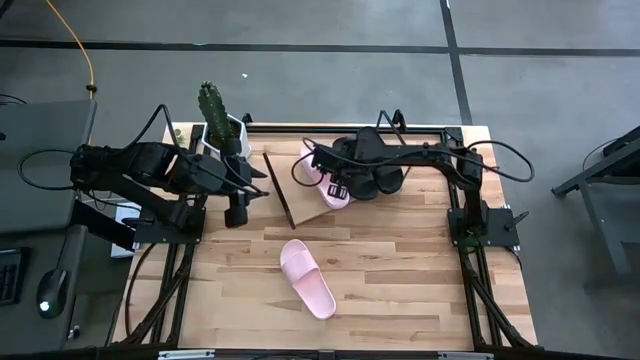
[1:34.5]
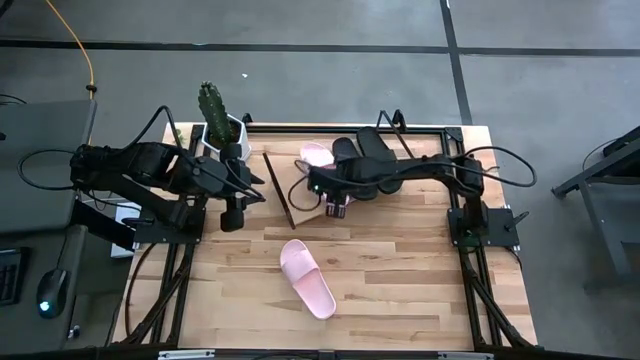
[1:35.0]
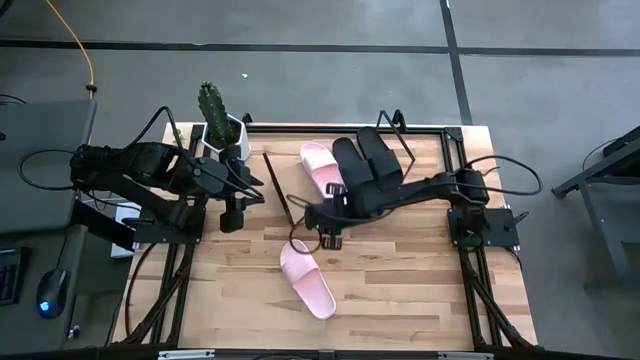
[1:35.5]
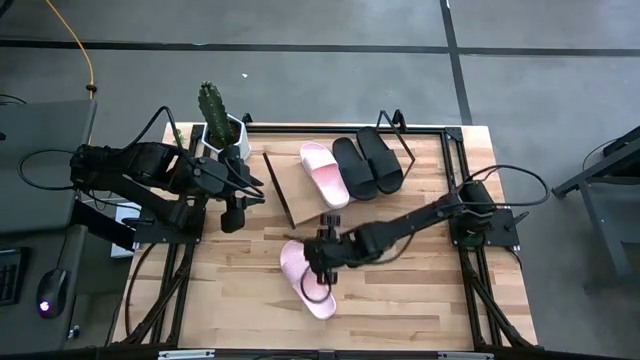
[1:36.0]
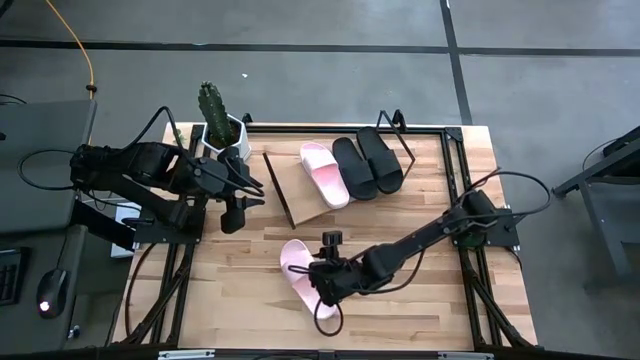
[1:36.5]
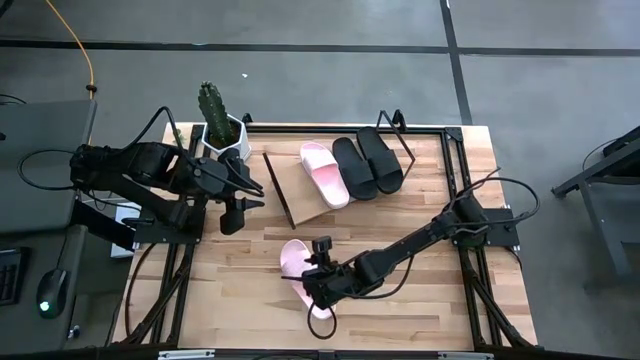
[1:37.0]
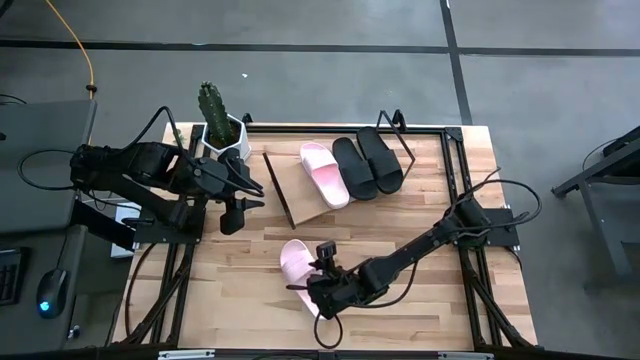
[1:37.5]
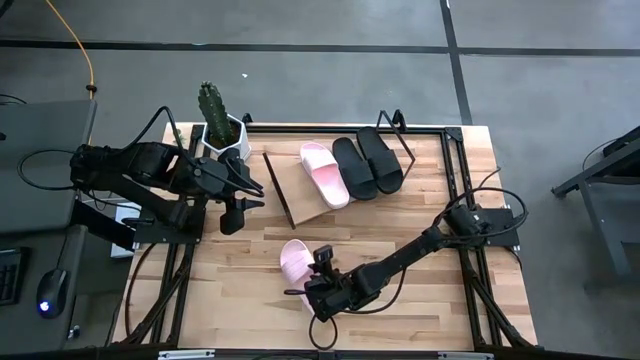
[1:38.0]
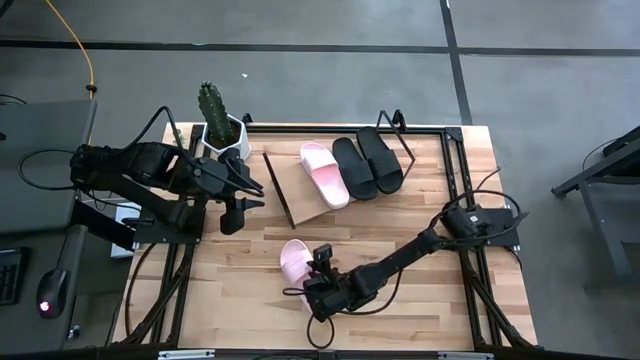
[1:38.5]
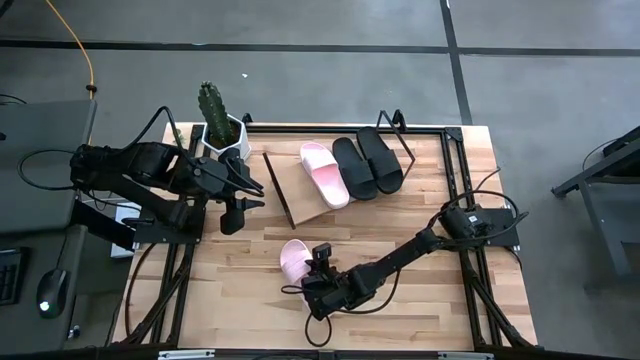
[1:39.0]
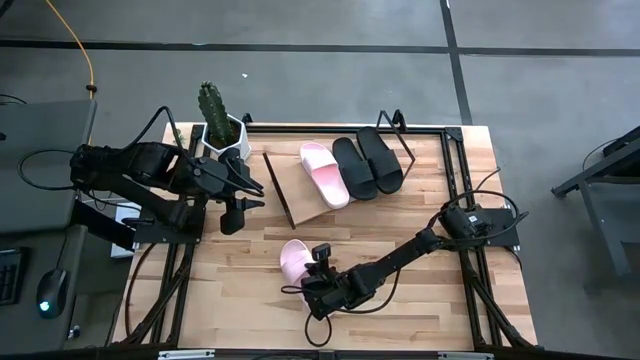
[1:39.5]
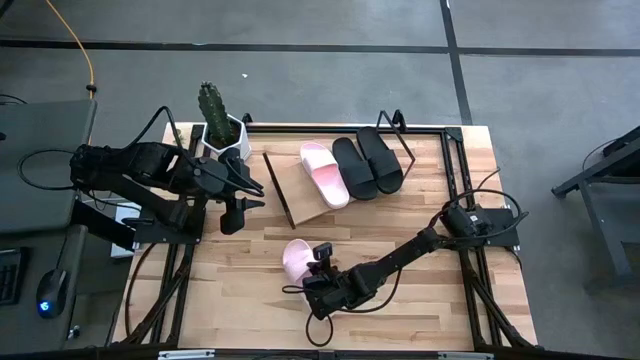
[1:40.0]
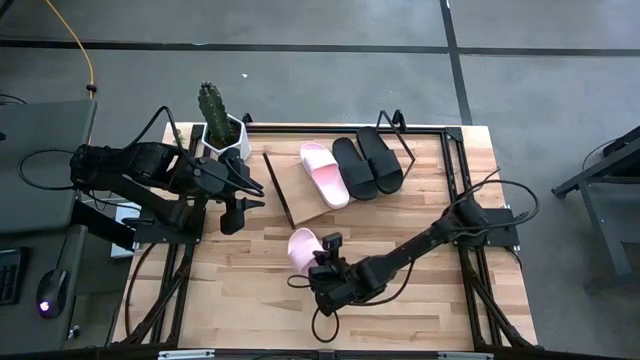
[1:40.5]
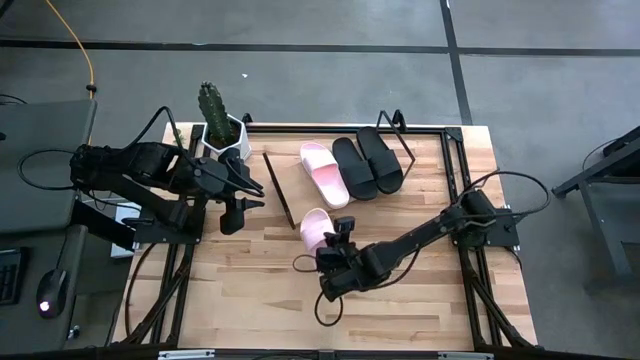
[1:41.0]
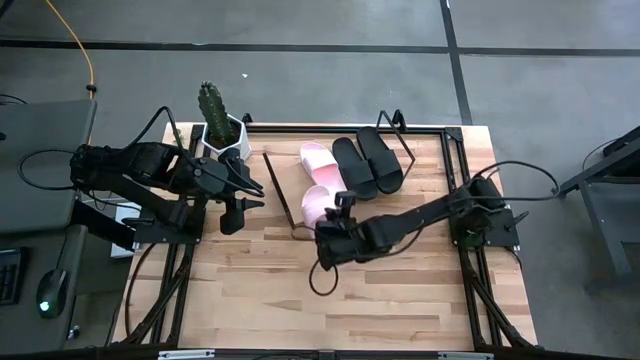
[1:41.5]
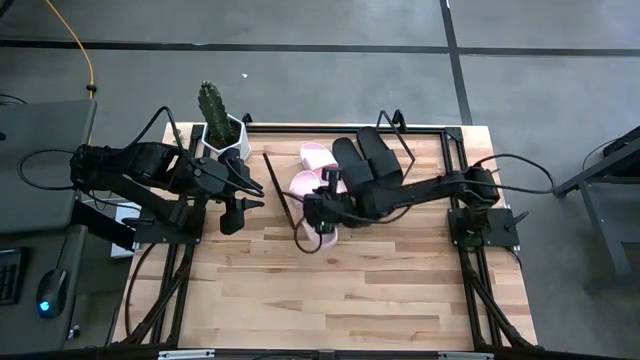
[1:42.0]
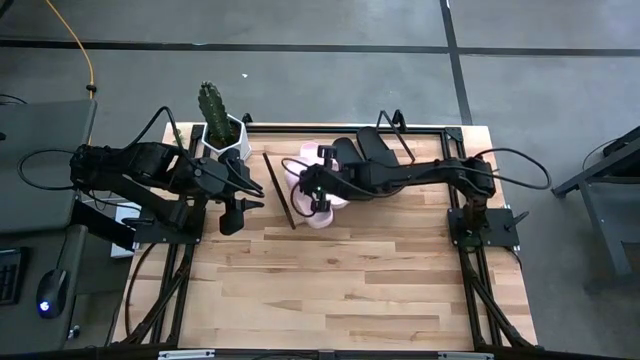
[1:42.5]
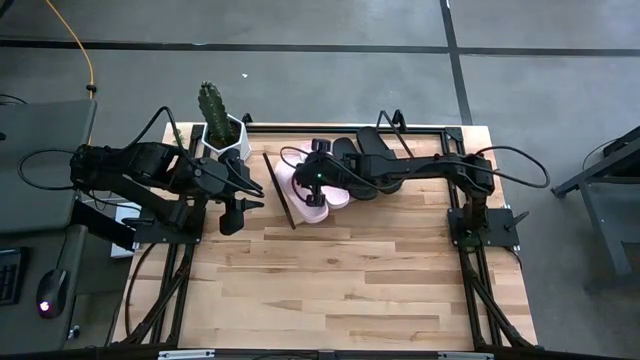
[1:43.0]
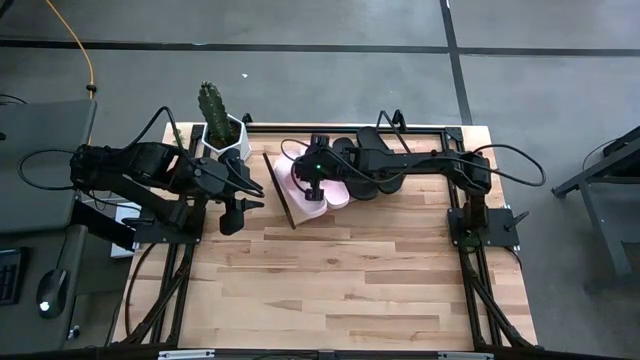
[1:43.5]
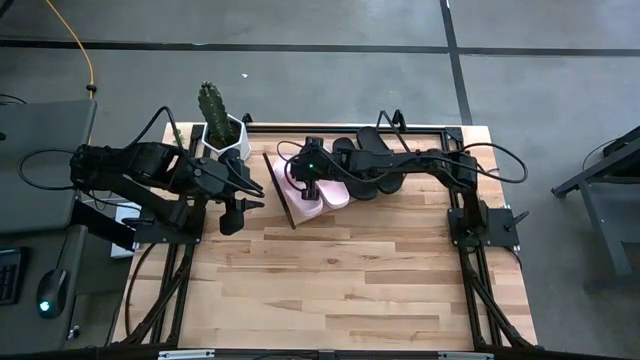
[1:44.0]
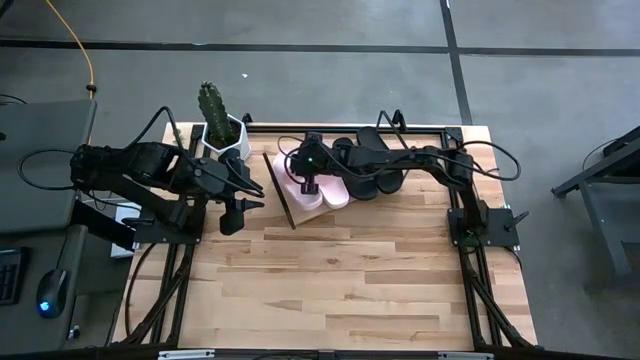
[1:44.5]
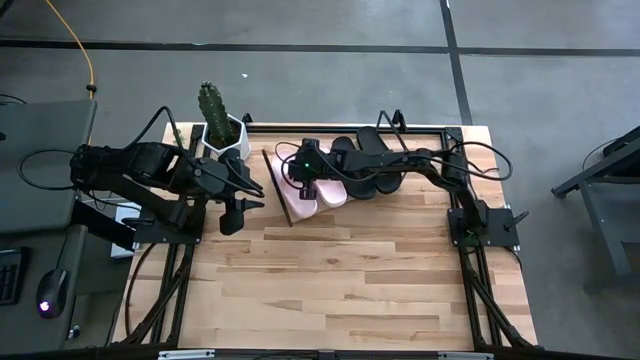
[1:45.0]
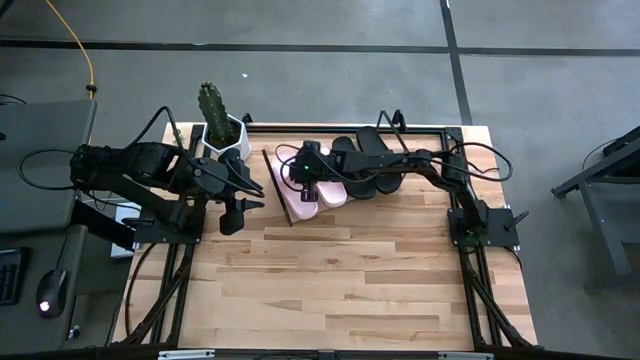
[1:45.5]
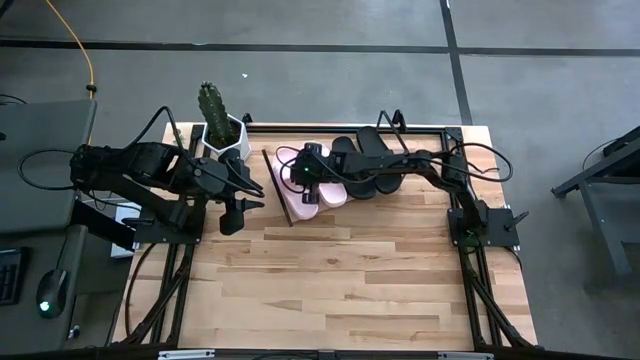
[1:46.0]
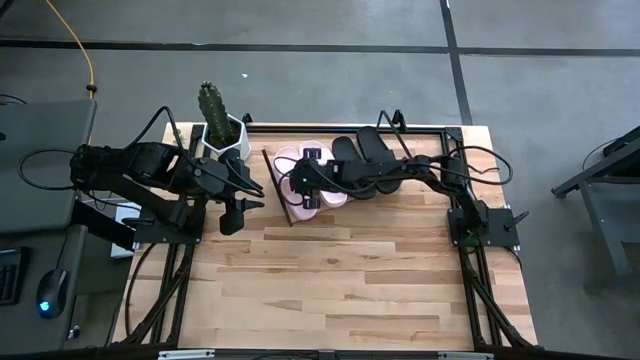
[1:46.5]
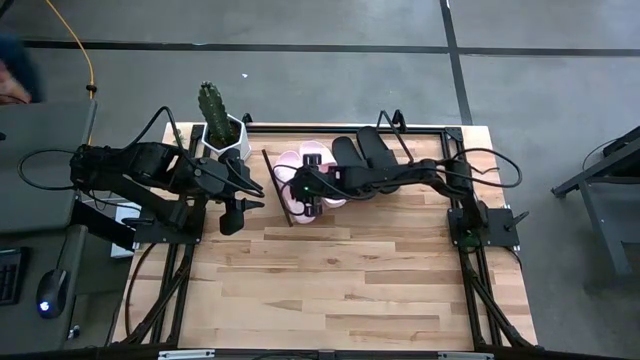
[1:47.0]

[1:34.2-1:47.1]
Task: Pick and place slides into the shelf
Put the bottom pink slide on the shelf

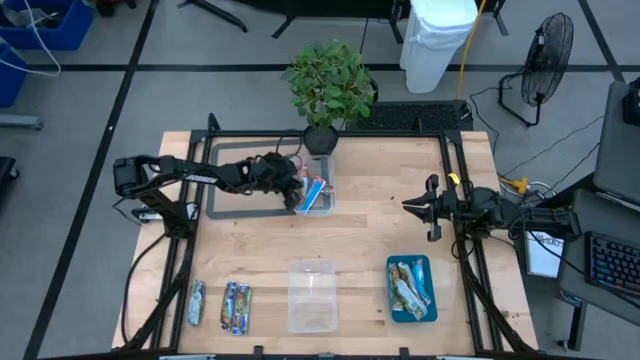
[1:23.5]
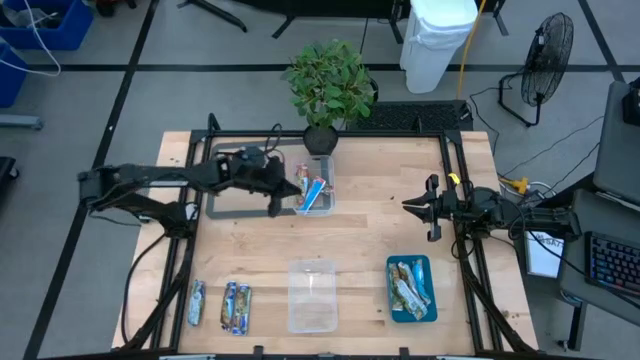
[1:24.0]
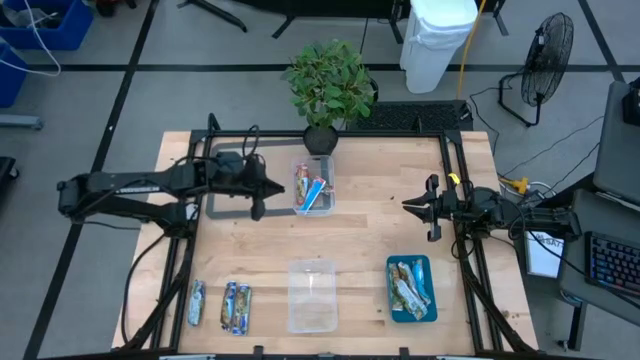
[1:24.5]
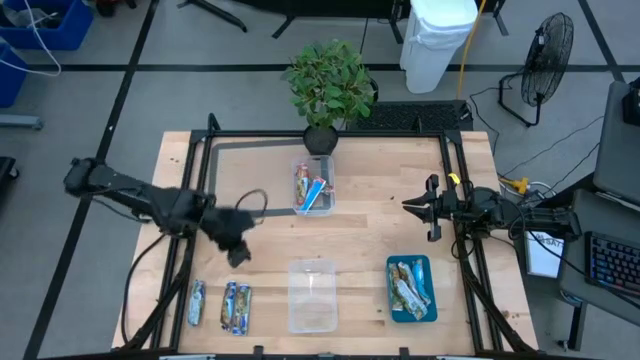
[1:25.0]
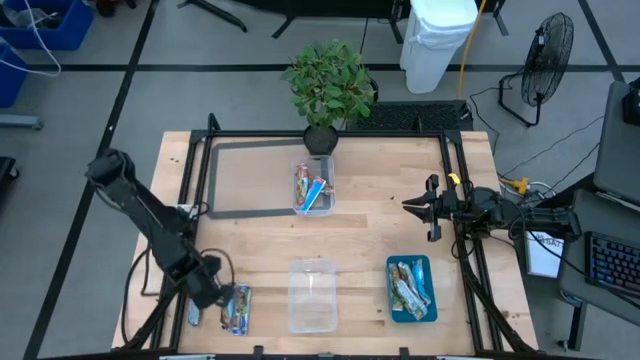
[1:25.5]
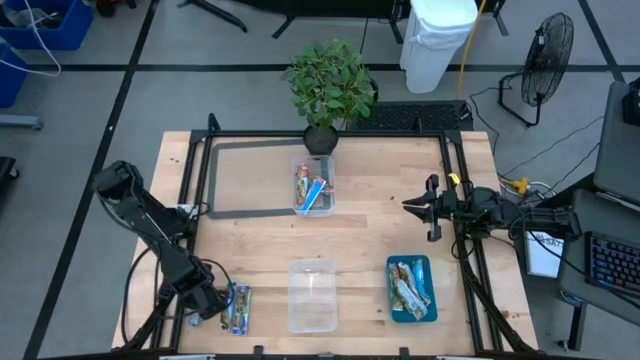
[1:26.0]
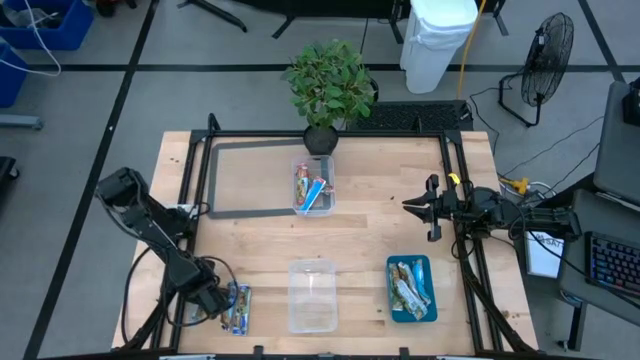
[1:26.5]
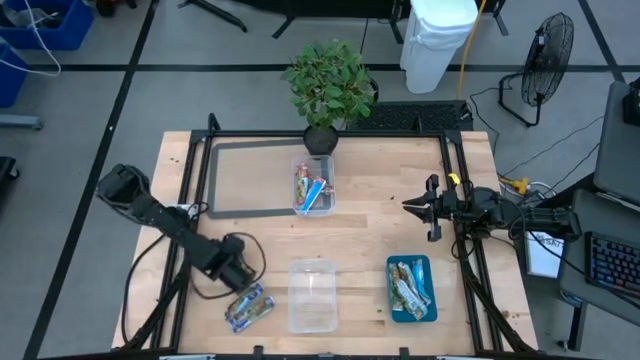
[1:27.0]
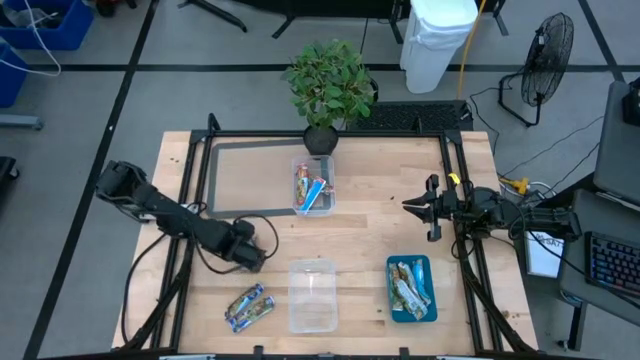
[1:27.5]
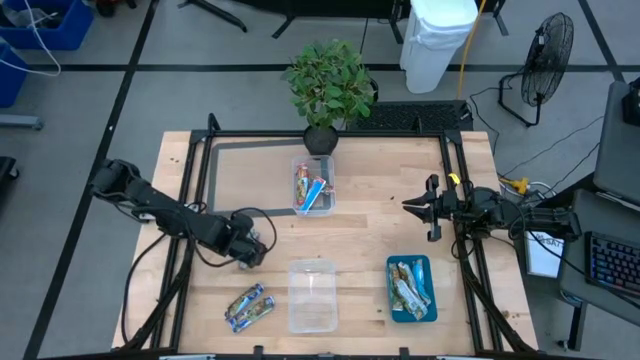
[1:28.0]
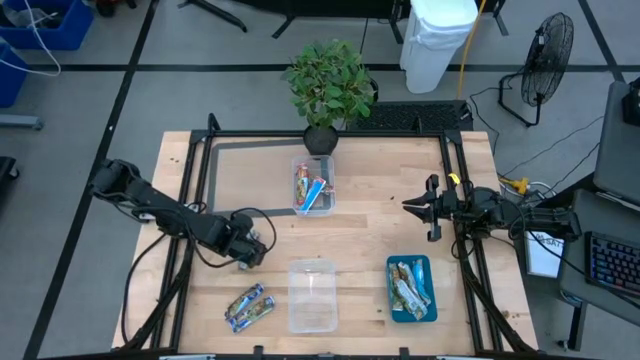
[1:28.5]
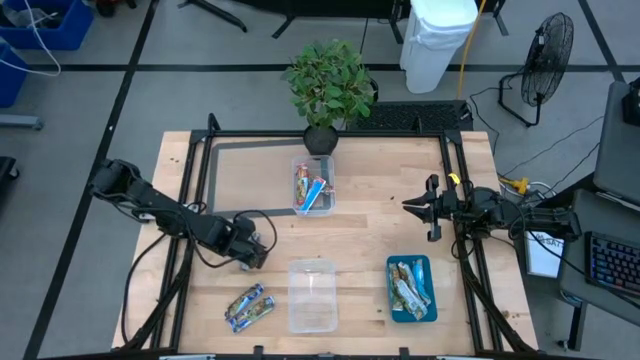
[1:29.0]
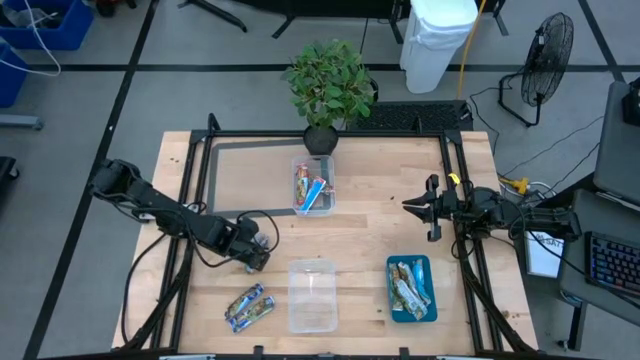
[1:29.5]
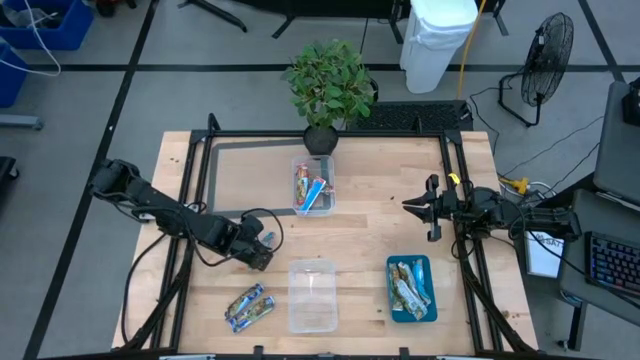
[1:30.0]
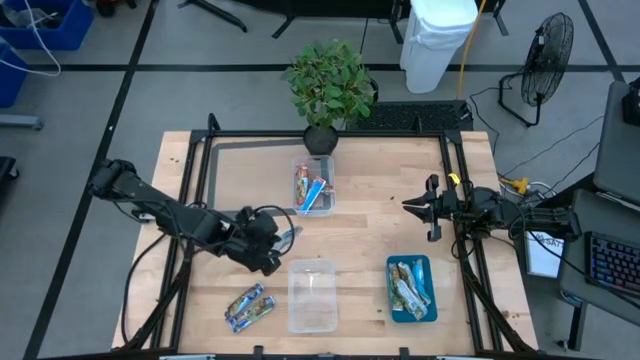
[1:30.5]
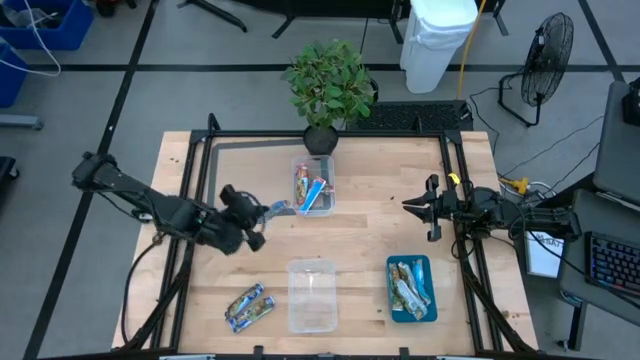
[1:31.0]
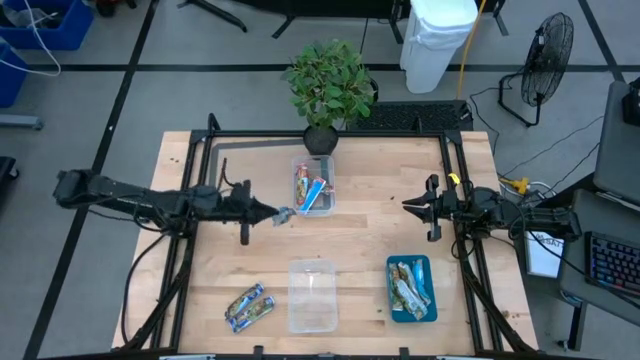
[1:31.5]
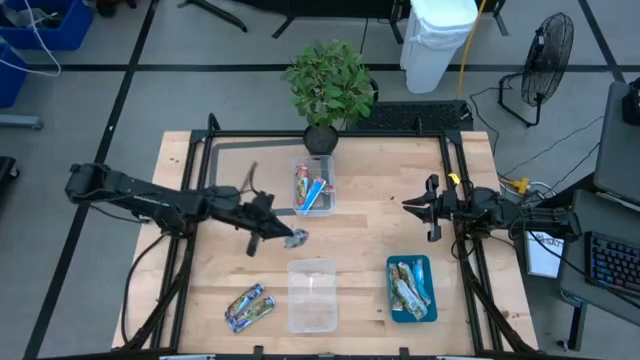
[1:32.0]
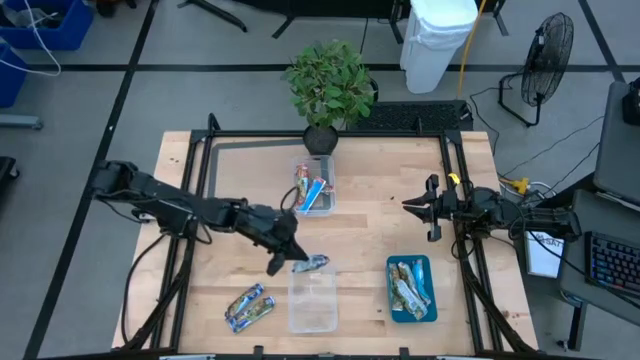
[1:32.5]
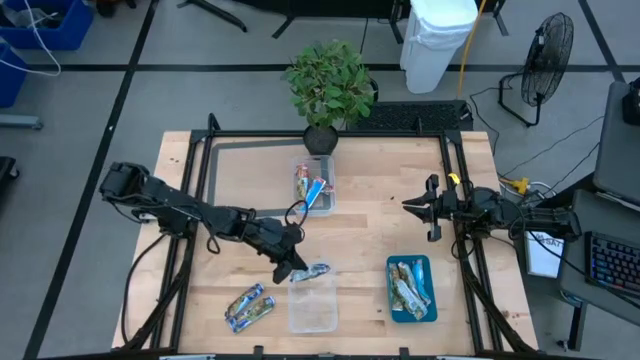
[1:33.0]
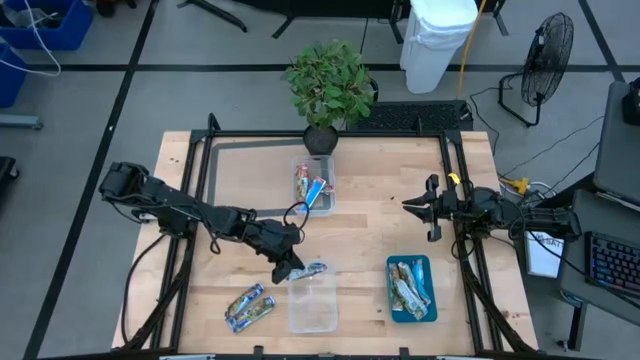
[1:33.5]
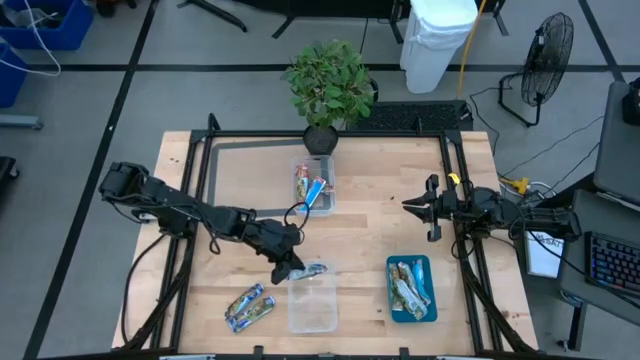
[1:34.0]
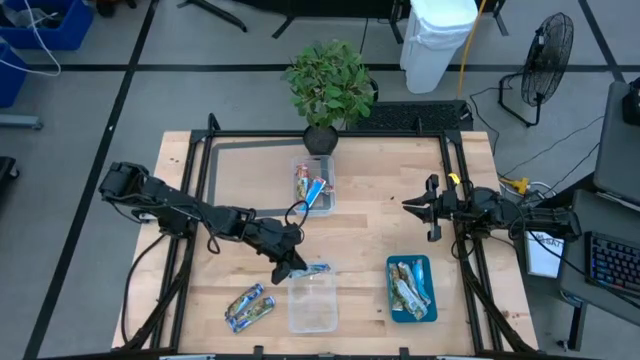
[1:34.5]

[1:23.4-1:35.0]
Task: Pick and place Granola Bars by type
Put the blue granola bar into the bottom transparent bin
